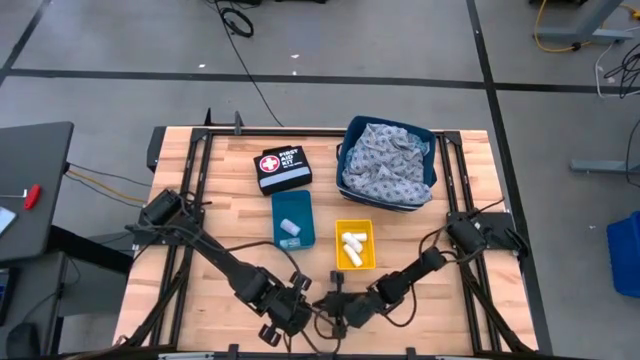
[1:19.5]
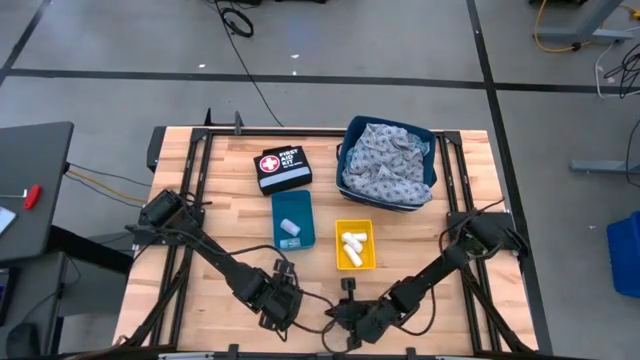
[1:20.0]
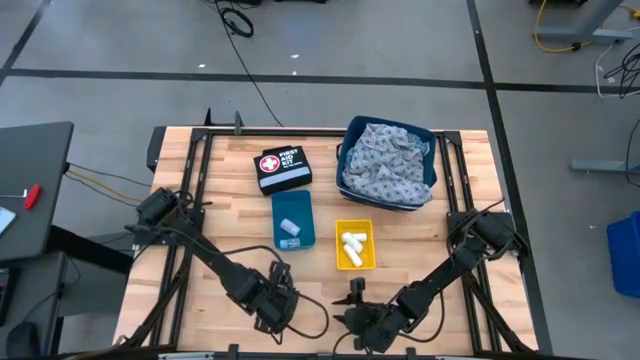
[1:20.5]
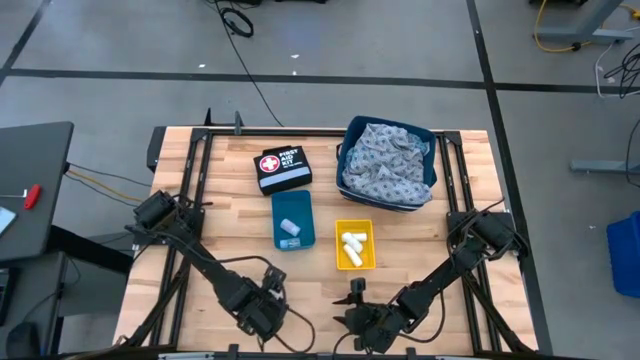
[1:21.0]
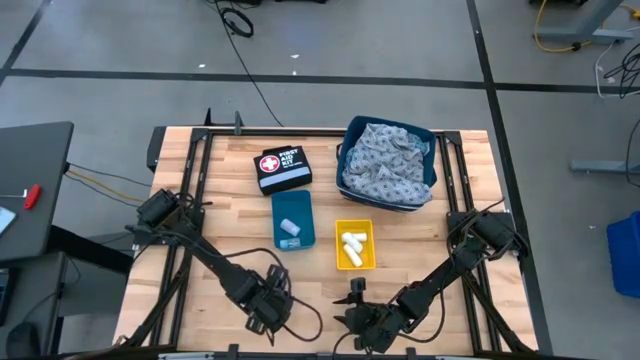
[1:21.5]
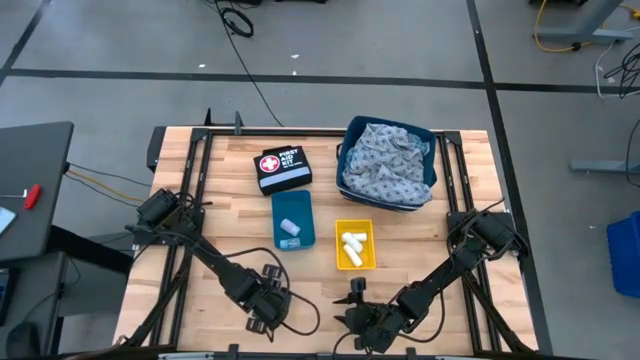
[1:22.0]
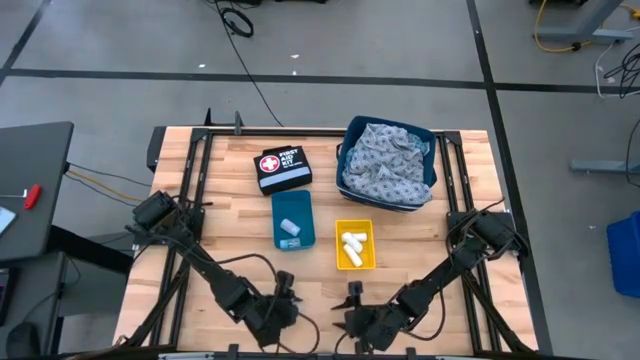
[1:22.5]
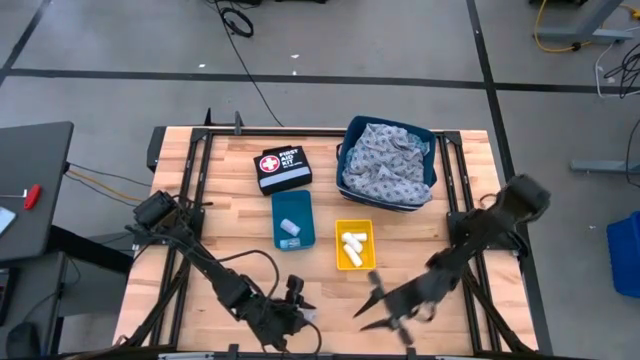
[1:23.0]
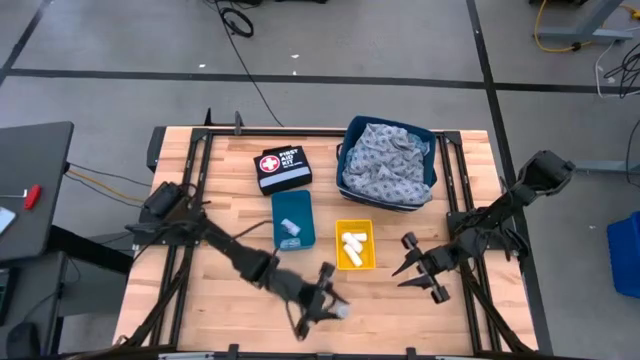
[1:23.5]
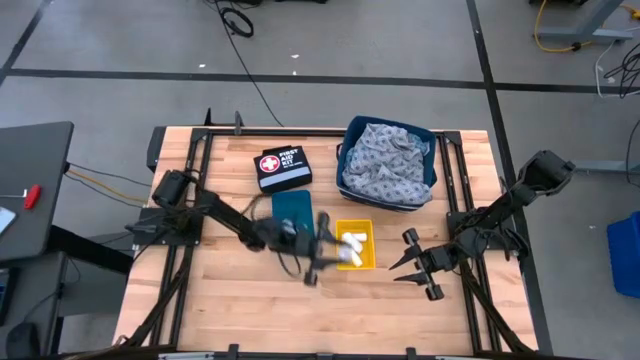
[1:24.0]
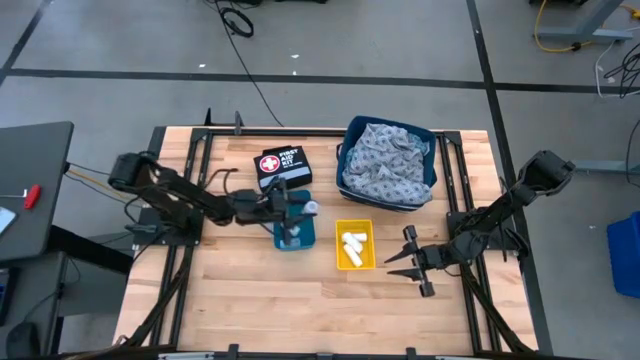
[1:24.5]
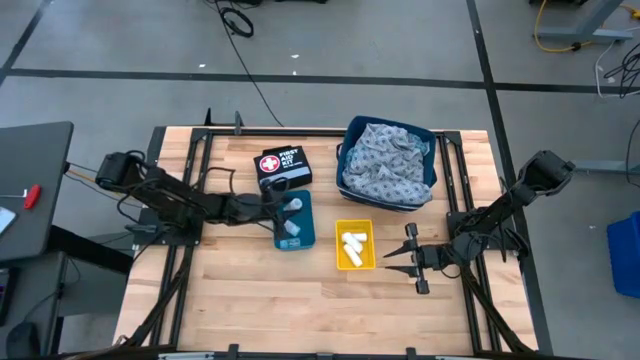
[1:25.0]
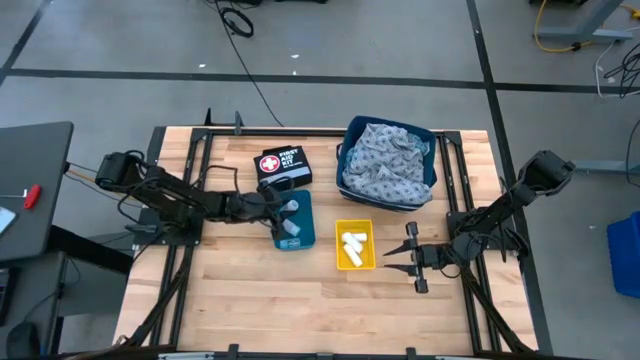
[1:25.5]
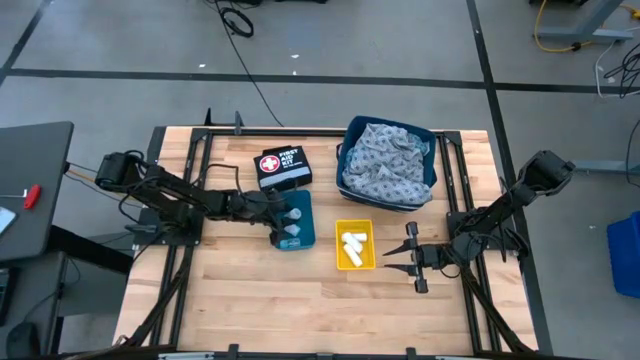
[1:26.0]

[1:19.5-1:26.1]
Task: Pick & place medical supplies in basket/bin
Put the transparent pill bottle into the blue bin

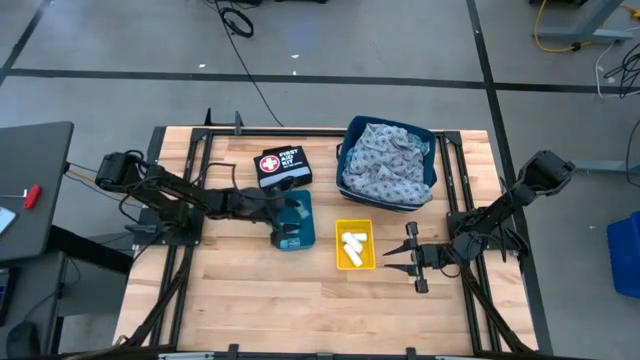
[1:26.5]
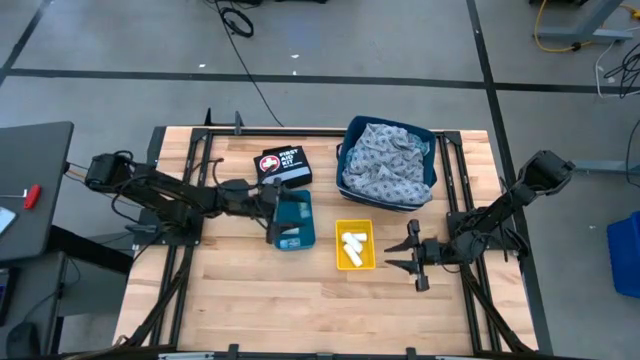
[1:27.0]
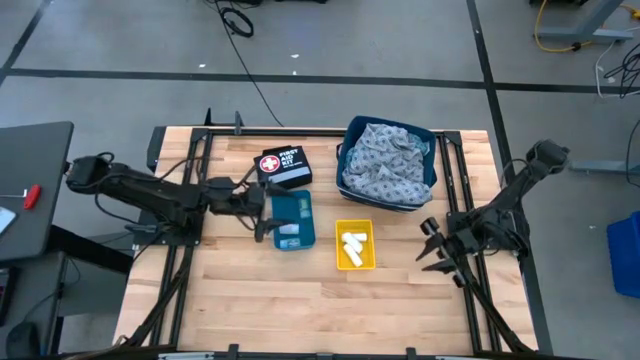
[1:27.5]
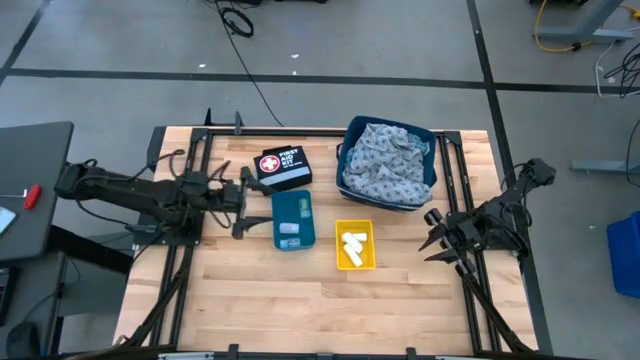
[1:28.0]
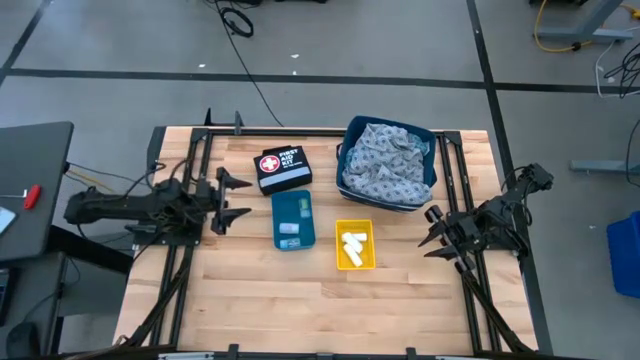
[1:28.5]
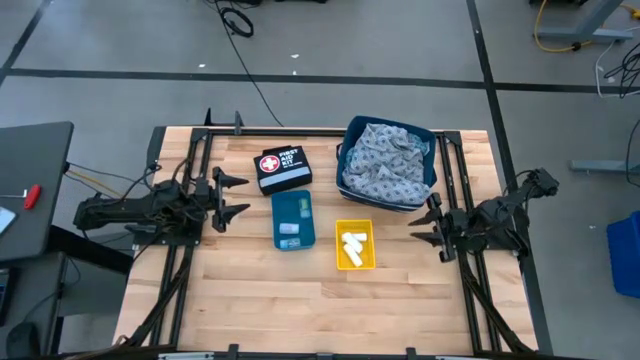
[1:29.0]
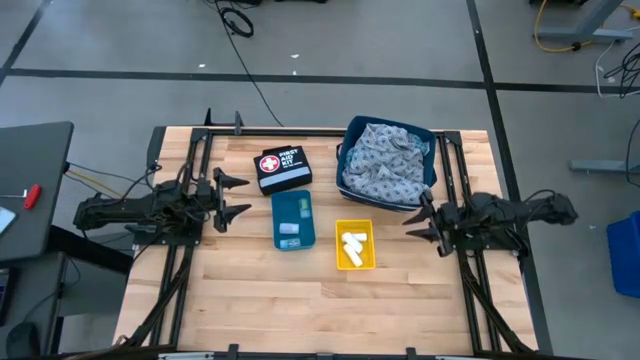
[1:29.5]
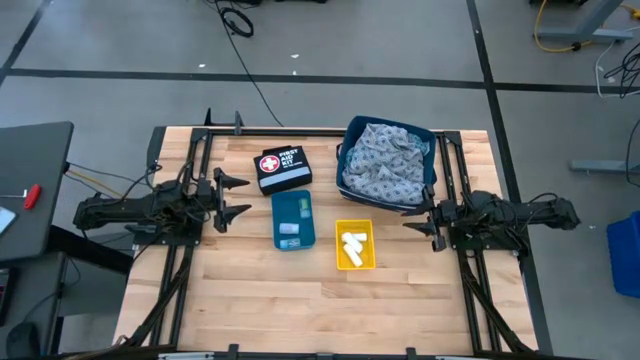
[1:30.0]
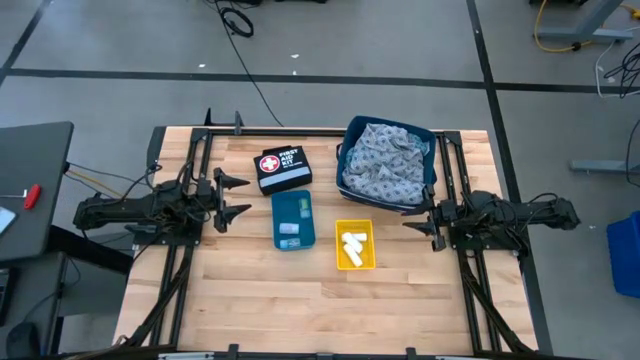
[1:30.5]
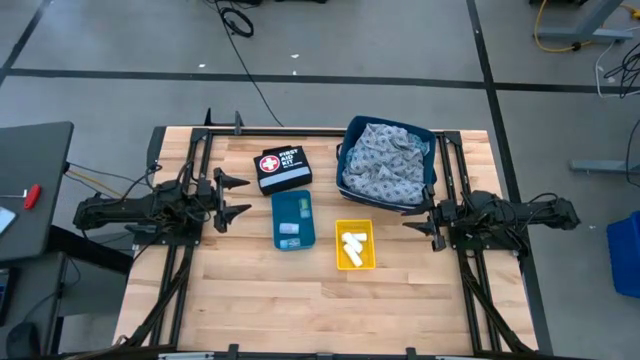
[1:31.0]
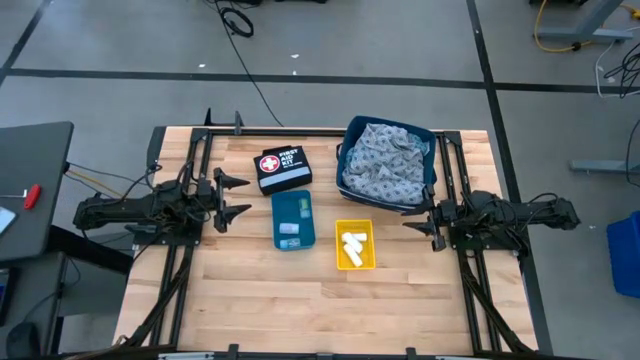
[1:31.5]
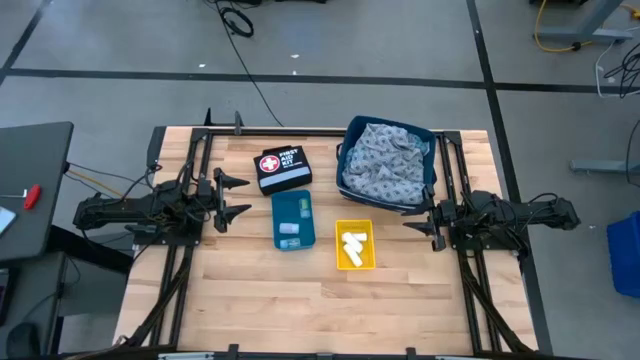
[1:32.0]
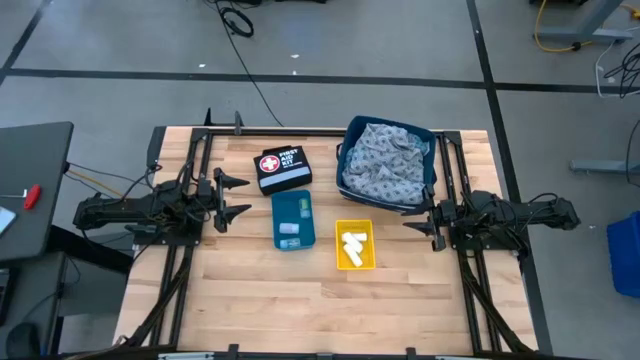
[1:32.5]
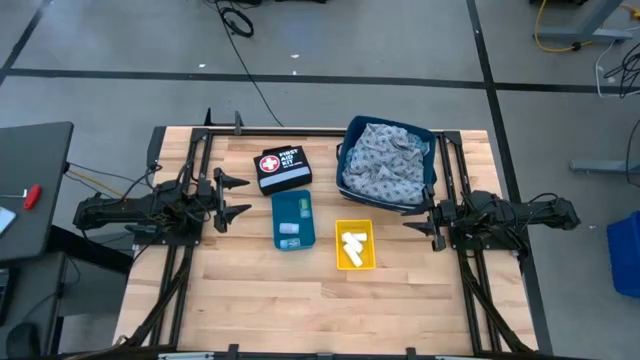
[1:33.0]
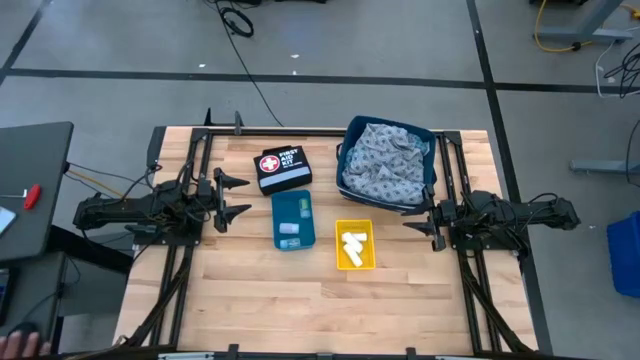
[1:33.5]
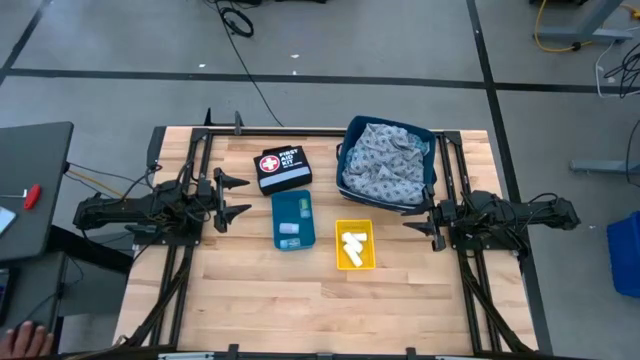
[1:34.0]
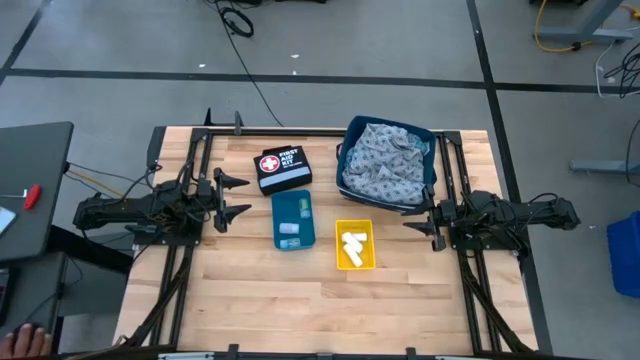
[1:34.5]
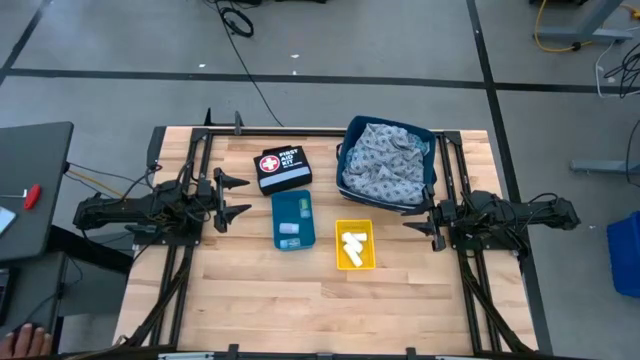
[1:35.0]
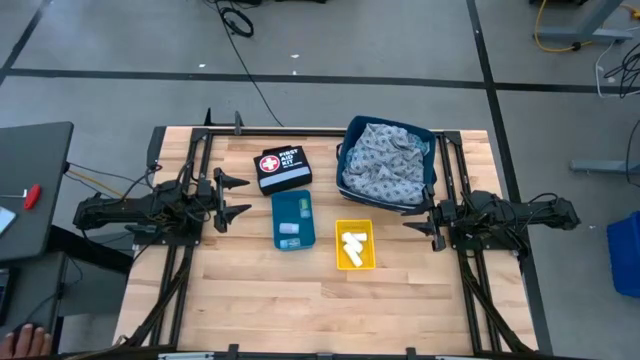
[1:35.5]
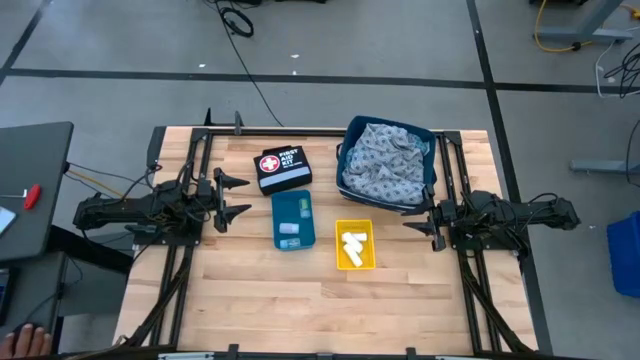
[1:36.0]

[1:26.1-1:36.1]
Return to Home Position
